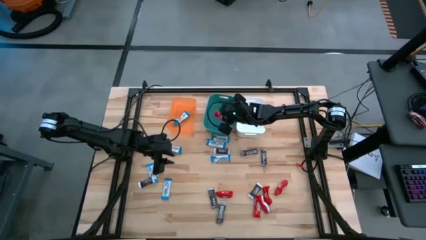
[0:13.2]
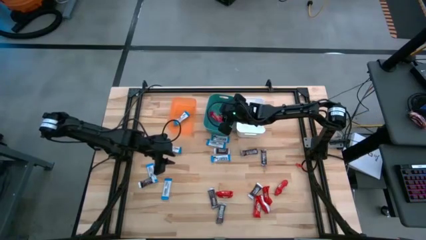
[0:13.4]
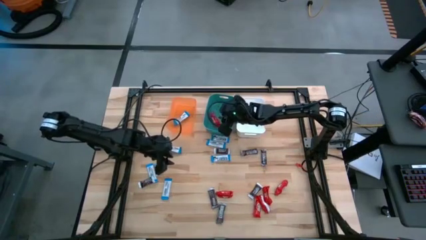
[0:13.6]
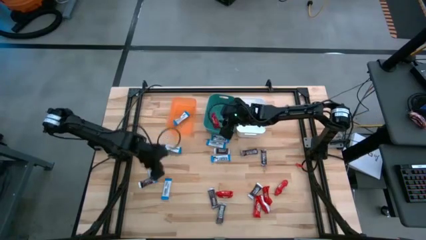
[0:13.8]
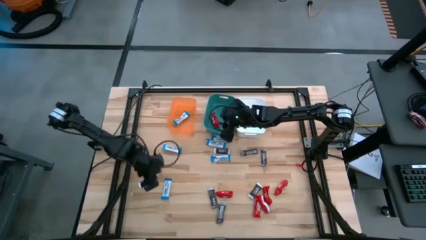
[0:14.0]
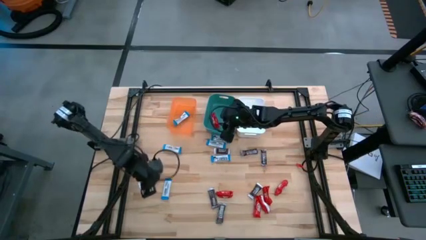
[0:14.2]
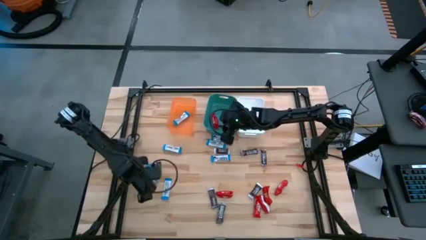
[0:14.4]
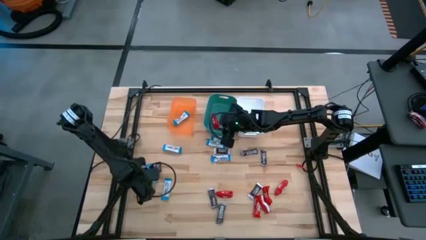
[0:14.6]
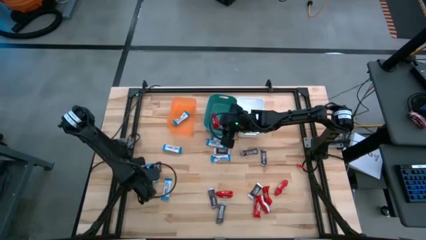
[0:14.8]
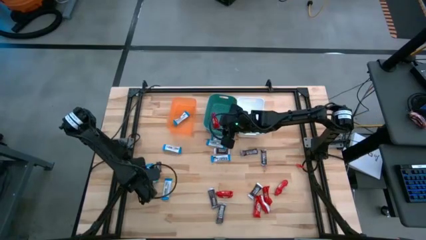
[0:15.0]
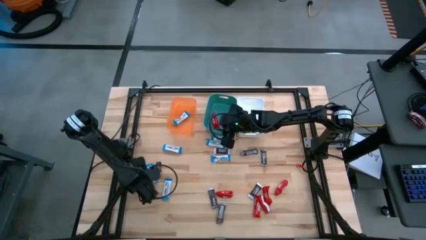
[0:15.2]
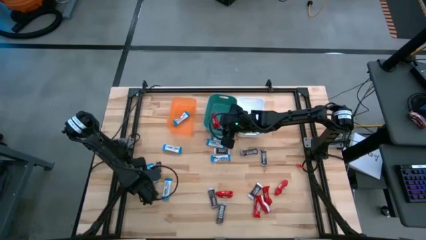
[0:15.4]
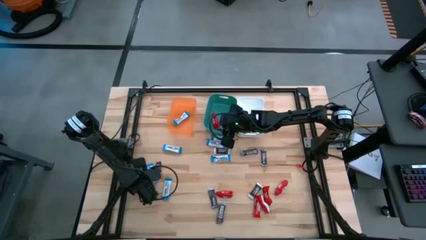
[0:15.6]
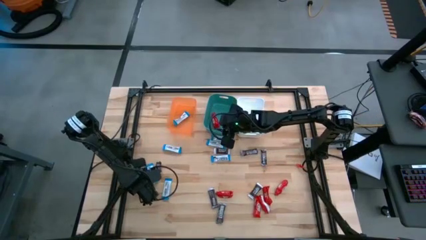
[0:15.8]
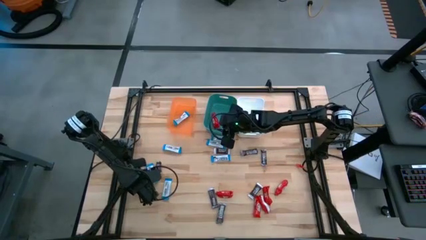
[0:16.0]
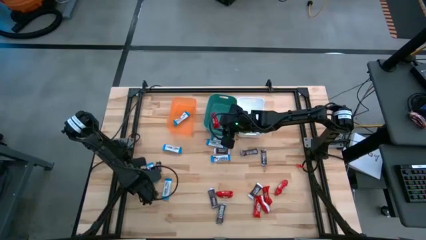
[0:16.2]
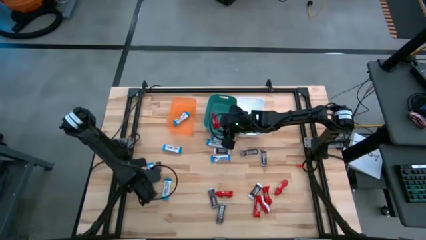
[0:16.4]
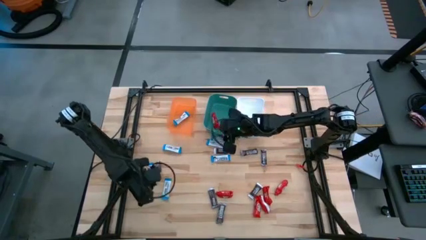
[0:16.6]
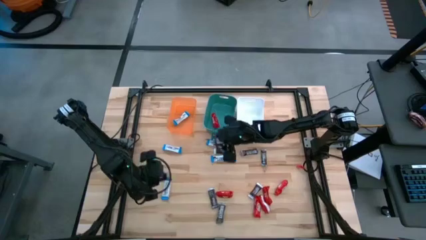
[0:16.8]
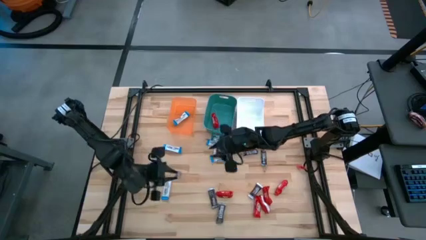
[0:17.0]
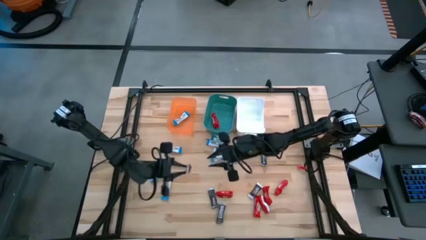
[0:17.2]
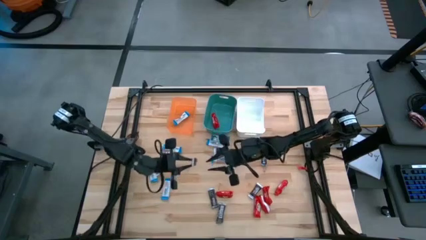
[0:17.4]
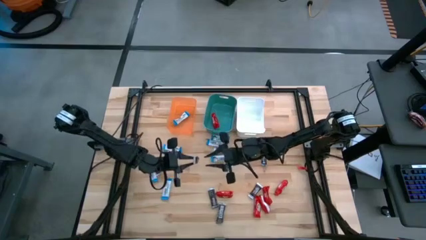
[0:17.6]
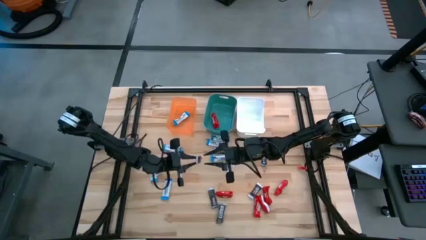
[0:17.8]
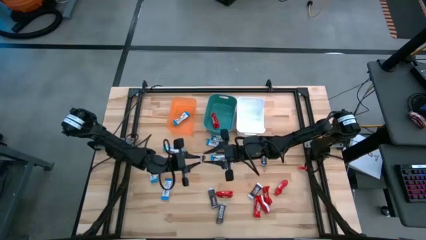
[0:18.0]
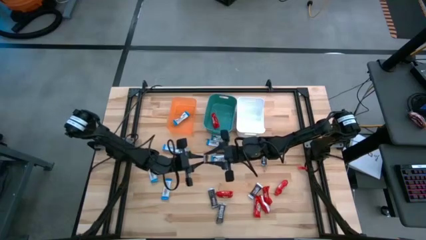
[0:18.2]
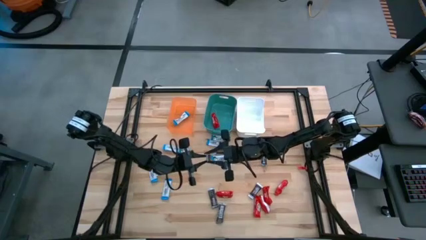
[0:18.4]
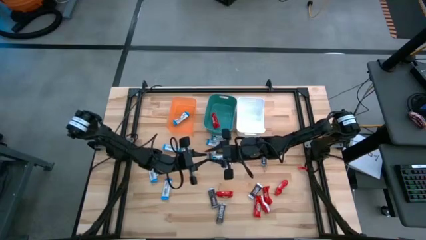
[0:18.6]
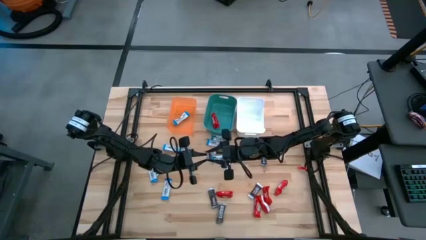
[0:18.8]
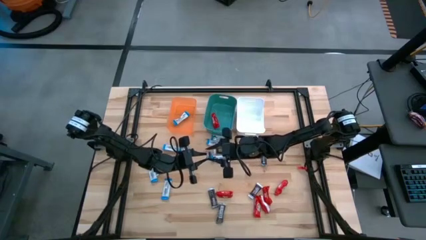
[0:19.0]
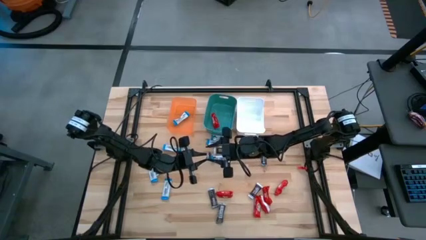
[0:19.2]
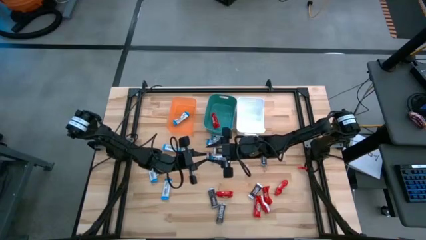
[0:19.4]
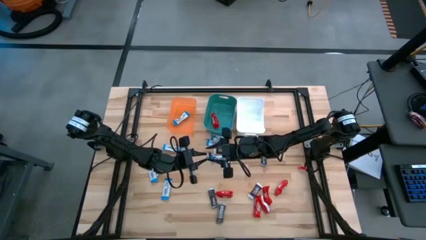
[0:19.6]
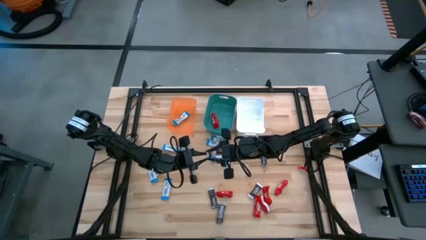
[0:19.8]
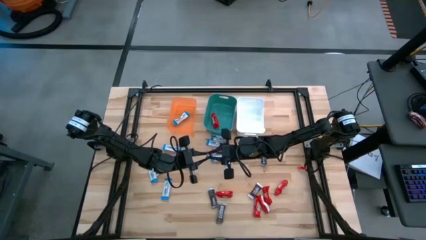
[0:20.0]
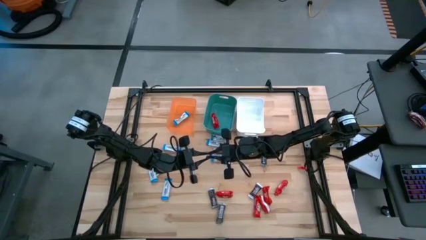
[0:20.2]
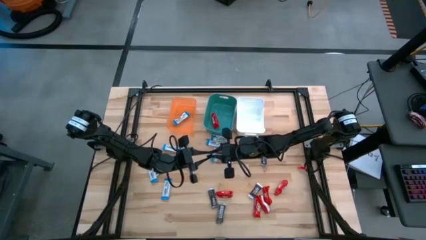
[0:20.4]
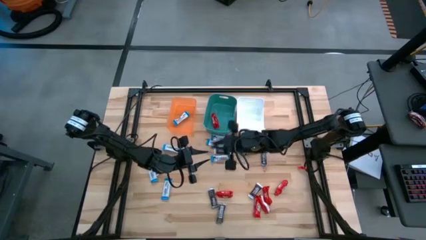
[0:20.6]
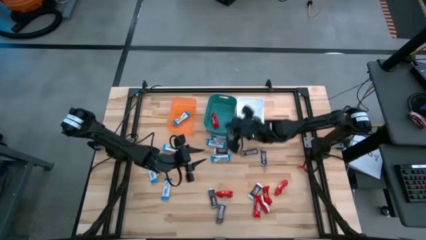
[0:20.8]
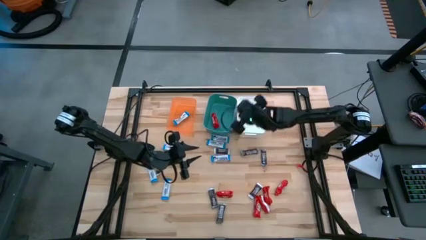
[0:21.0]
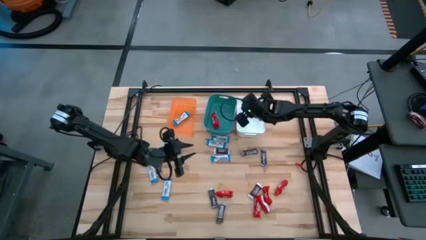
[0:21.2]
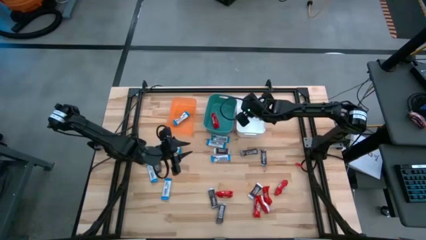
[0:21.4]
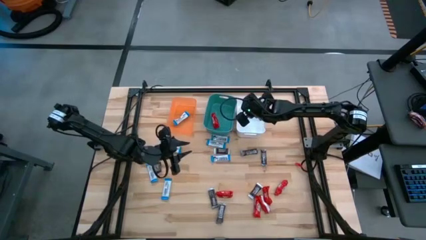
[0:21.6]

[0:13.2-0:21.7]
Task: Organize candy in baskets
Put the brown chocolate into the white bin

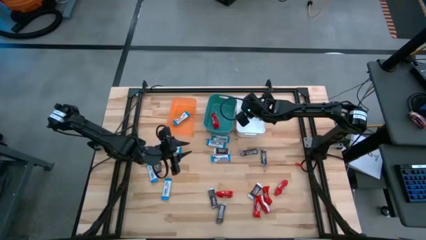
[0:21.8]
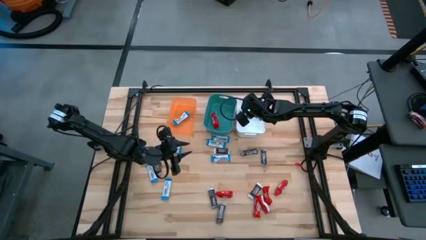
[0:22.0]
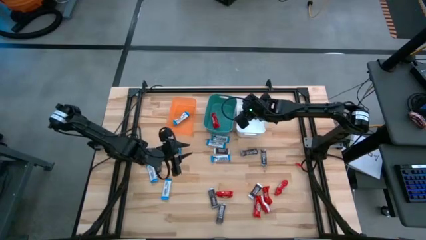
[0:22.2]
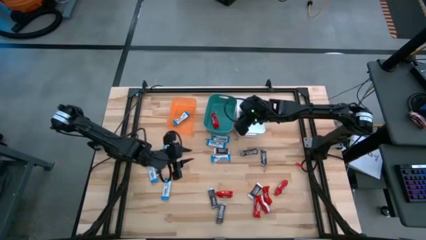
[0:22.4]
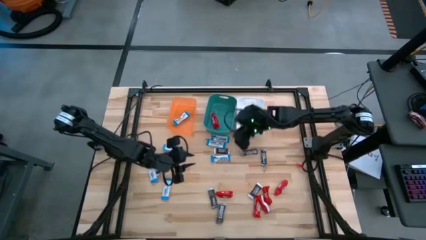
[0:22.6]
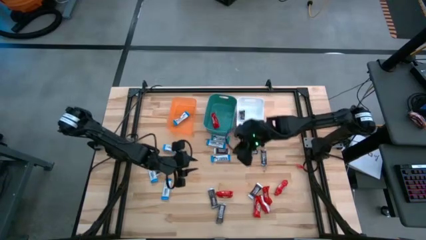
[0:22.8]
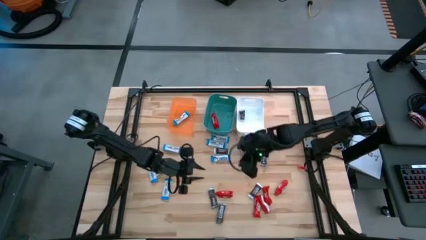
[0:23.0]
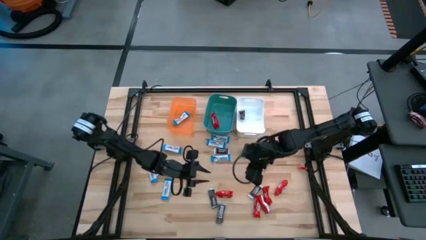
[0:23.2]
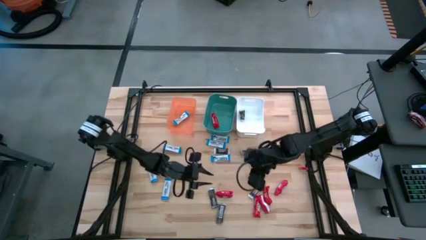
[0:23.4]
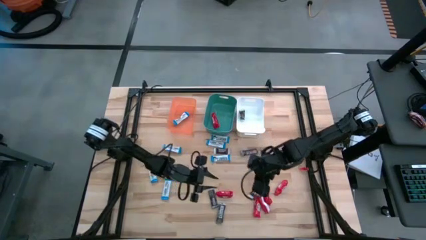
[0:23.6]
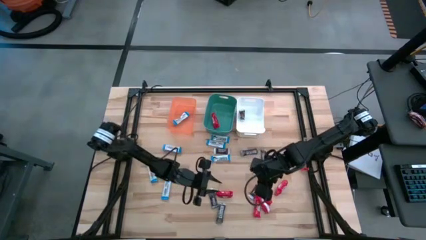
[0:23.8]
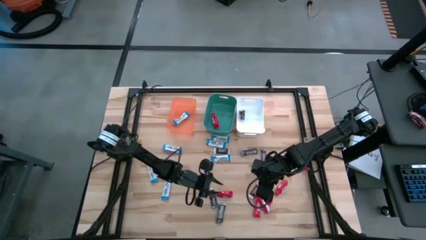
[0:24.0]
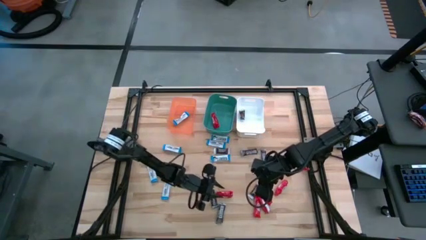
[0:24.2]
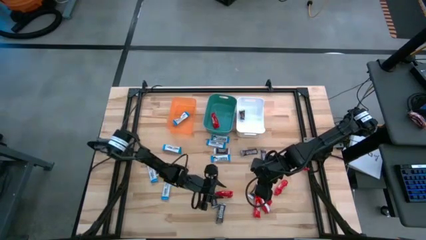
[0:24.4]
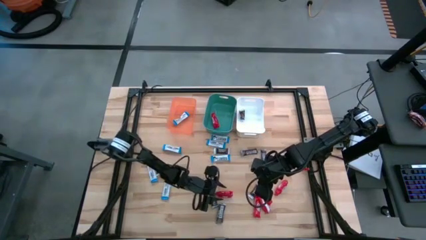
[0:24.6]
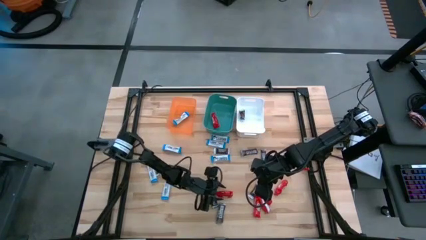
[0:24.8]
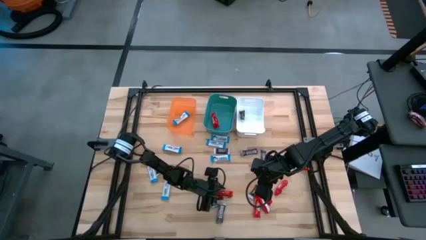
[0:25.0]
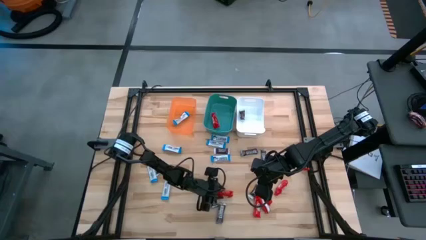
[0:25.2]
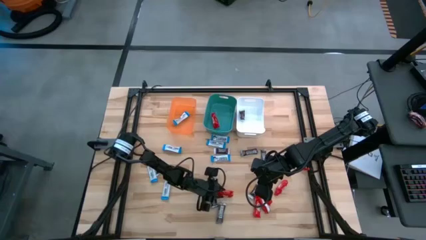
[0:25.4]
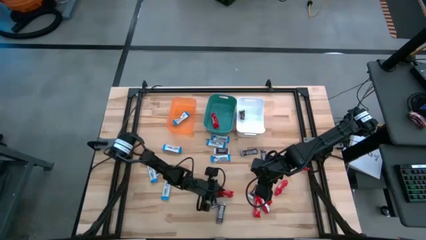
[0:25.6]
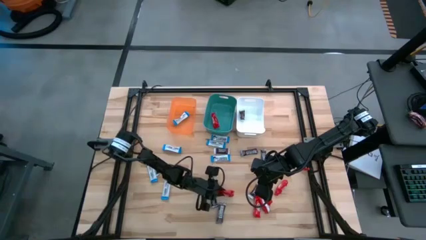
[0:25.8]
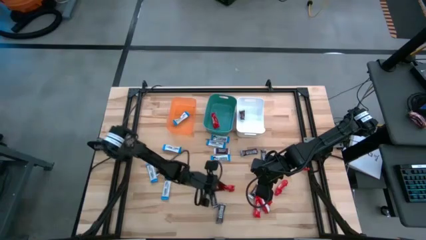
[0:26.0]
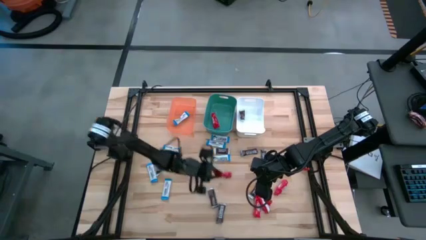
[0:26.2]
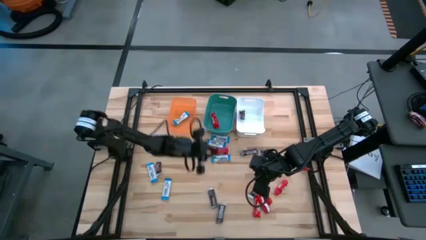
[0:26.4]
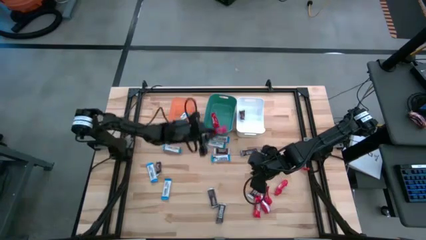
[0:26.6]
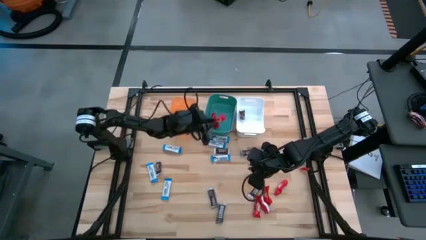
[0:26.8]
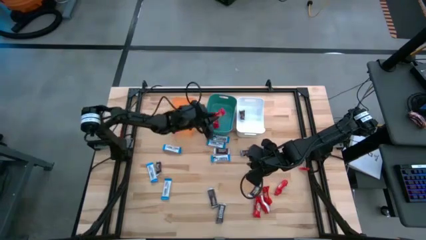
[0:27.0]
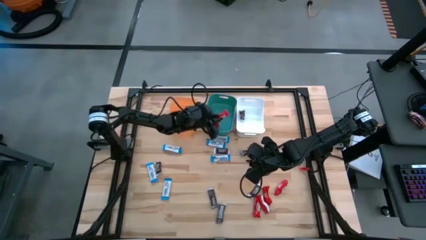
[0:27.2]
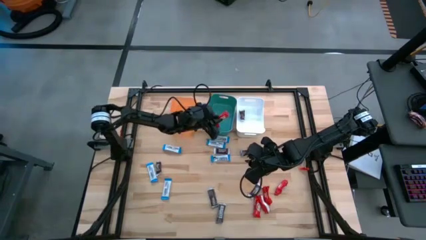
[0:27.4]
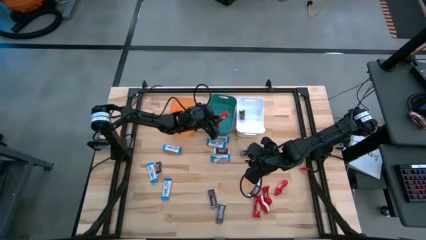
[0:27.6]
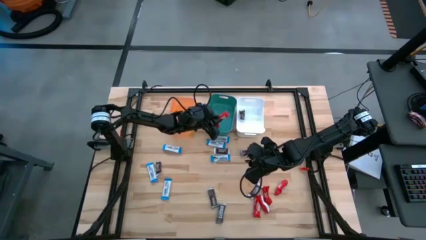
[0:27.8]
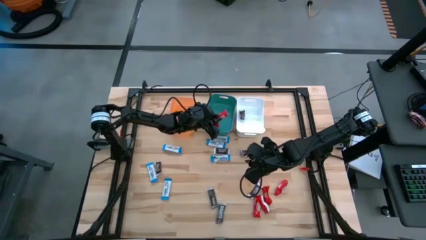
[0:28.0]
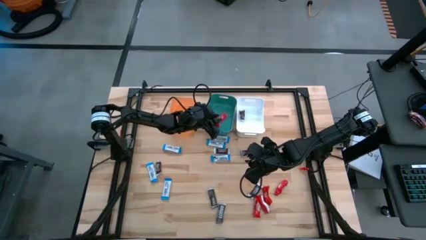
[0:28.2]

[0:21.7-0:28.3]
Put the red chocolate into the green bin
